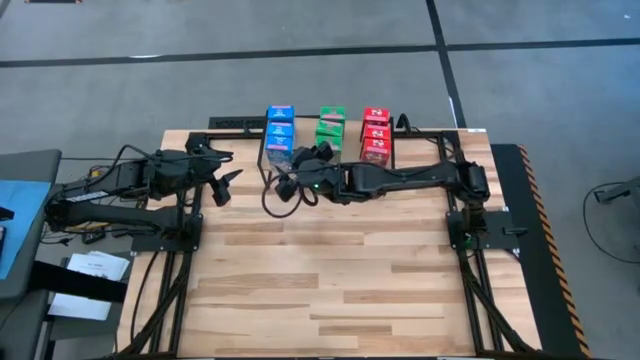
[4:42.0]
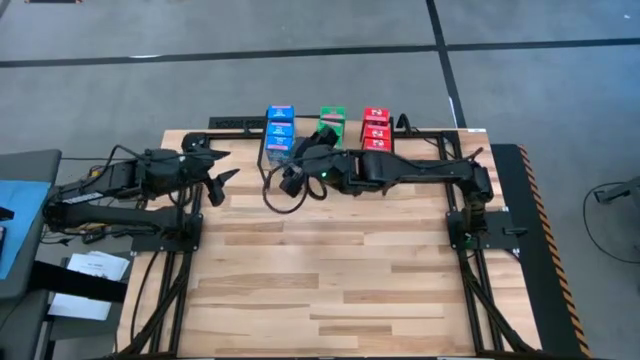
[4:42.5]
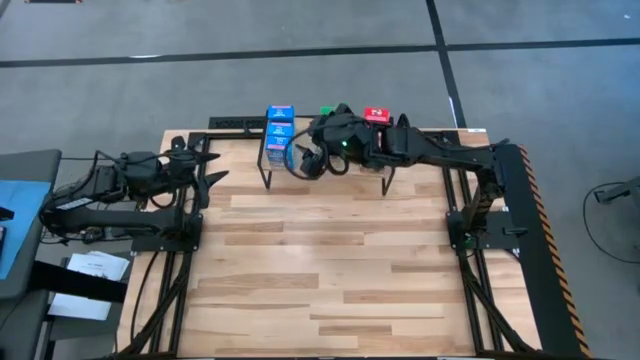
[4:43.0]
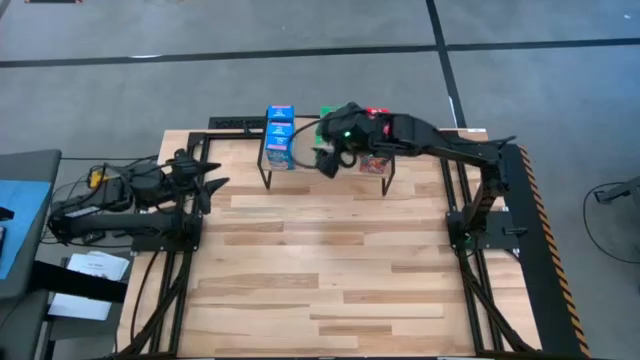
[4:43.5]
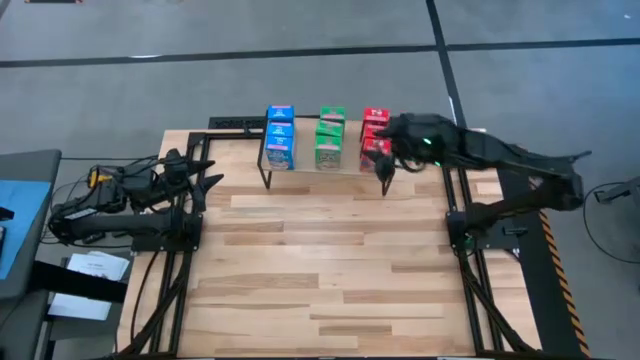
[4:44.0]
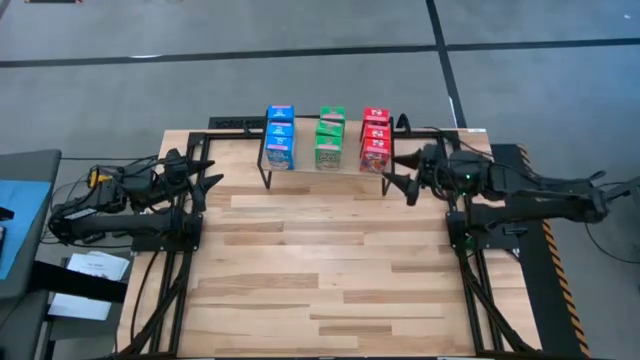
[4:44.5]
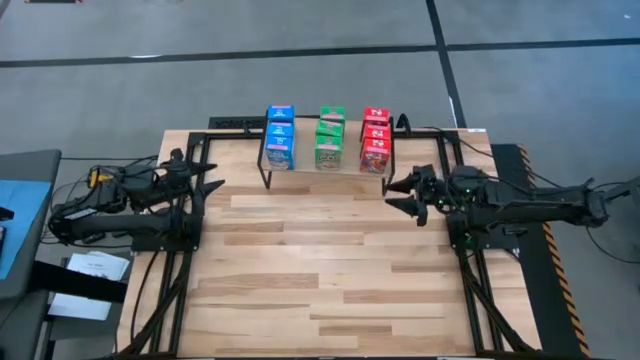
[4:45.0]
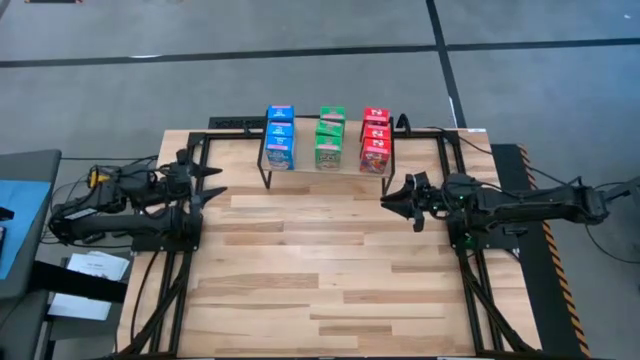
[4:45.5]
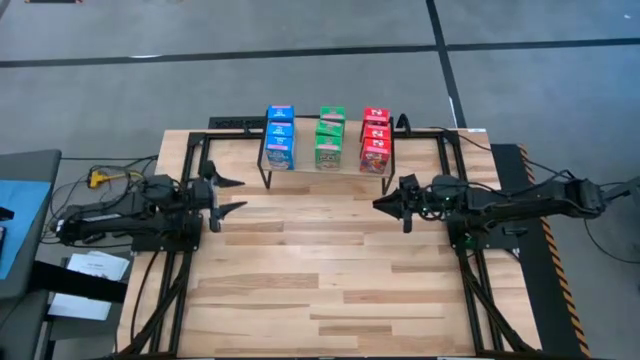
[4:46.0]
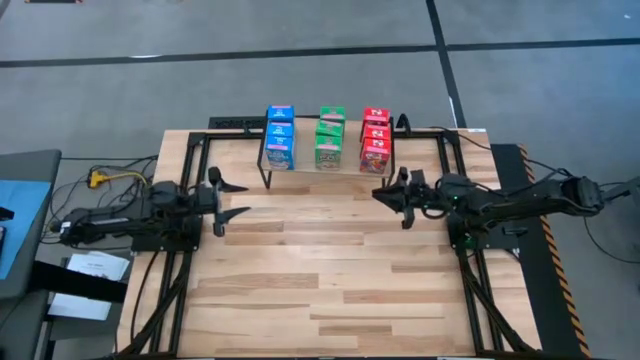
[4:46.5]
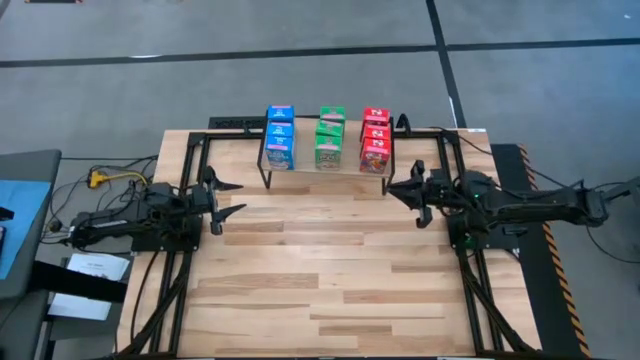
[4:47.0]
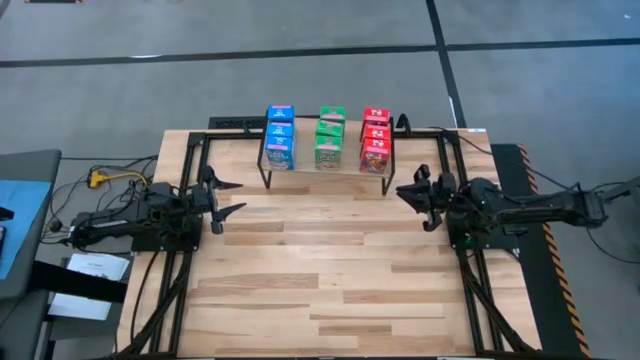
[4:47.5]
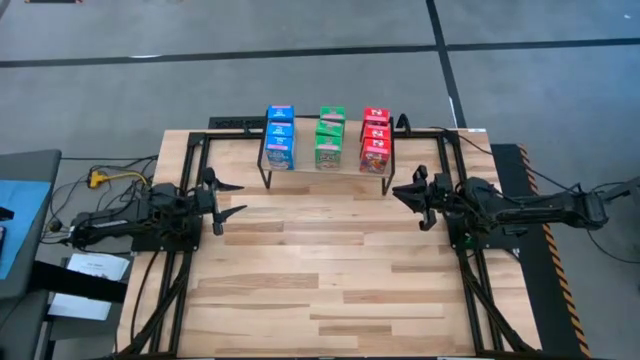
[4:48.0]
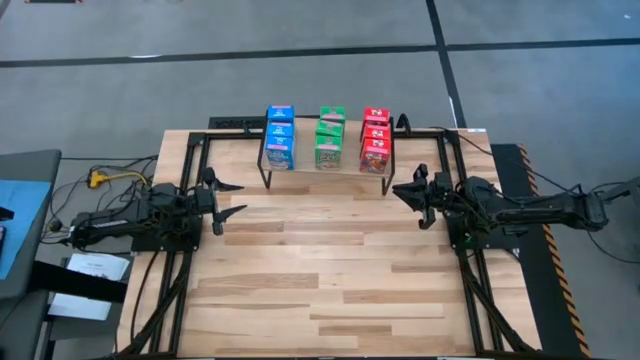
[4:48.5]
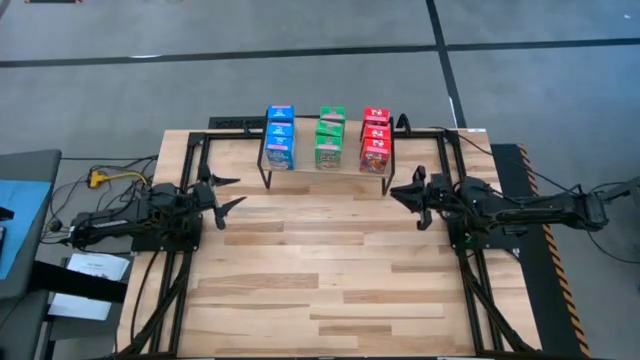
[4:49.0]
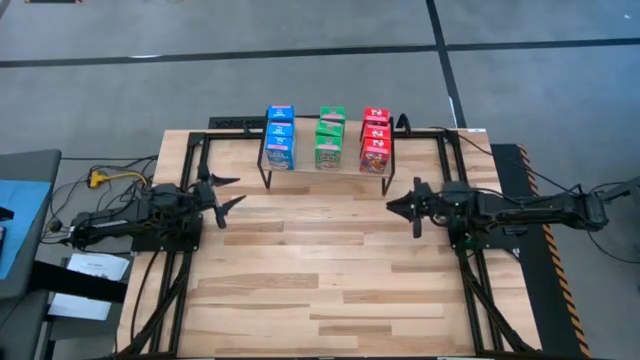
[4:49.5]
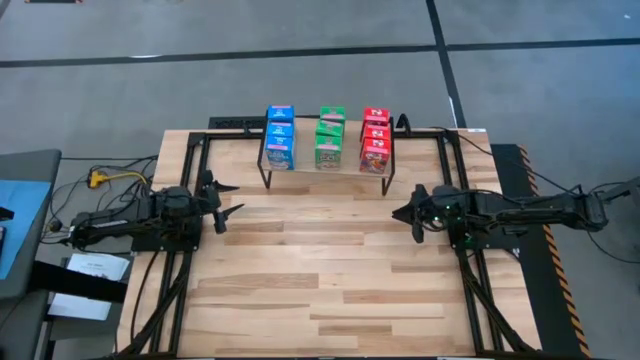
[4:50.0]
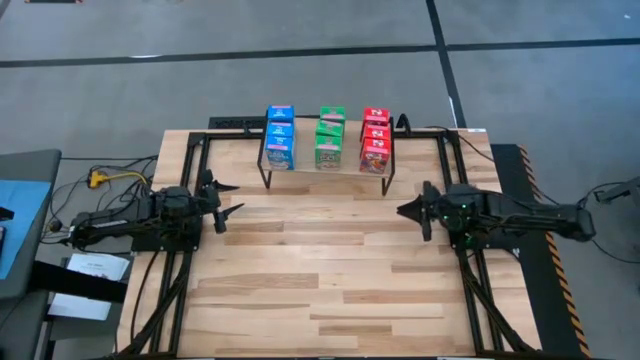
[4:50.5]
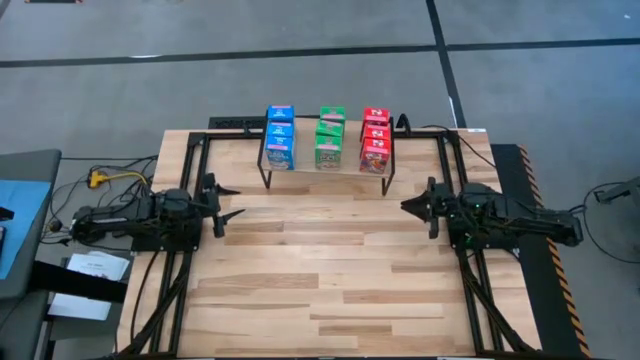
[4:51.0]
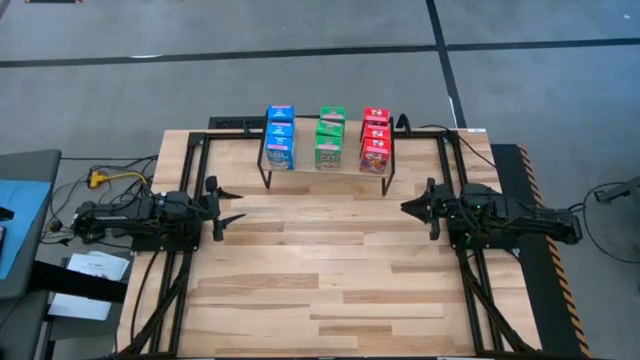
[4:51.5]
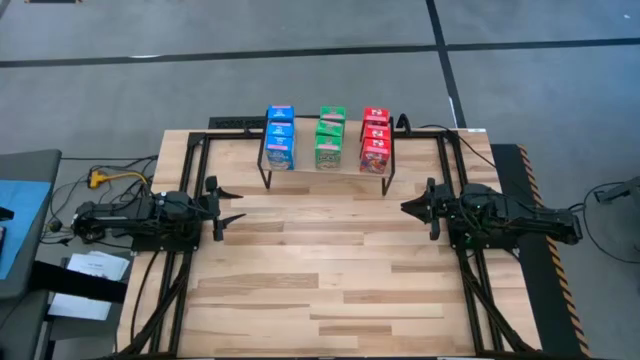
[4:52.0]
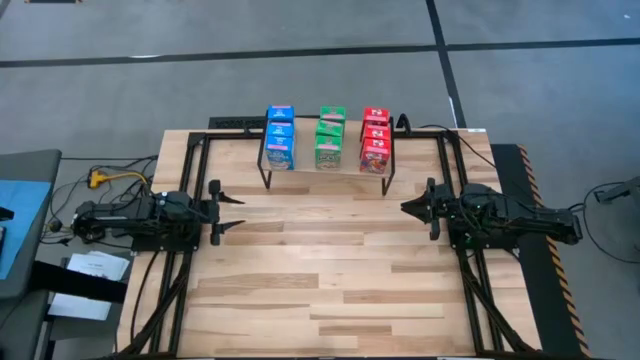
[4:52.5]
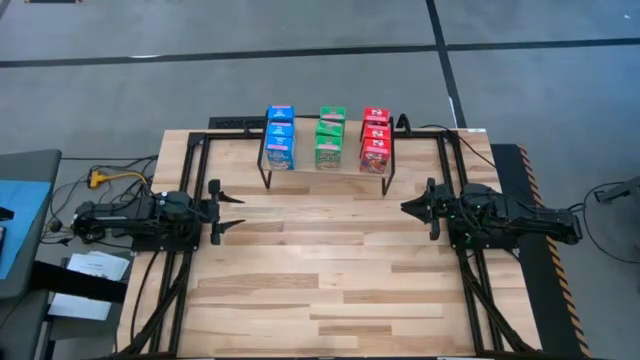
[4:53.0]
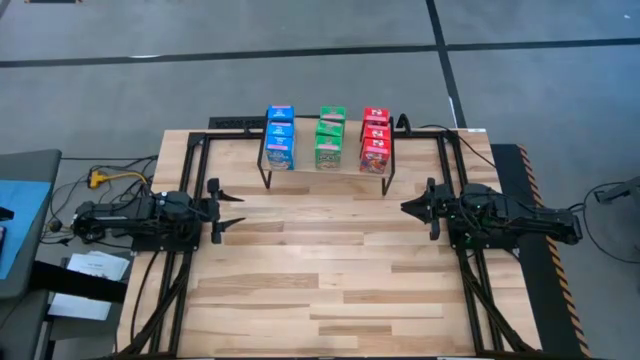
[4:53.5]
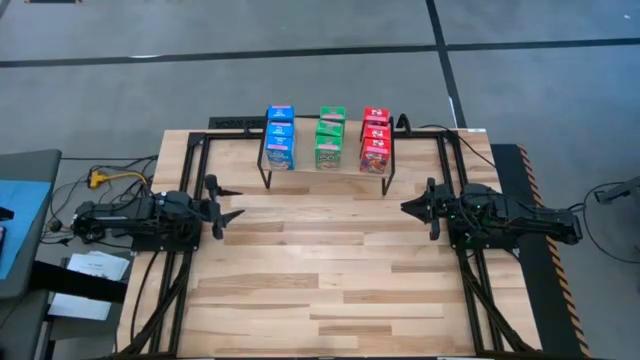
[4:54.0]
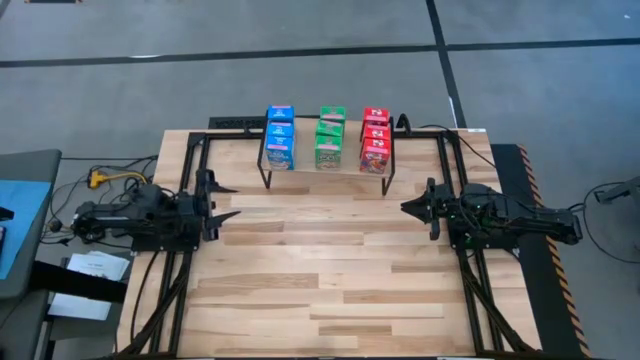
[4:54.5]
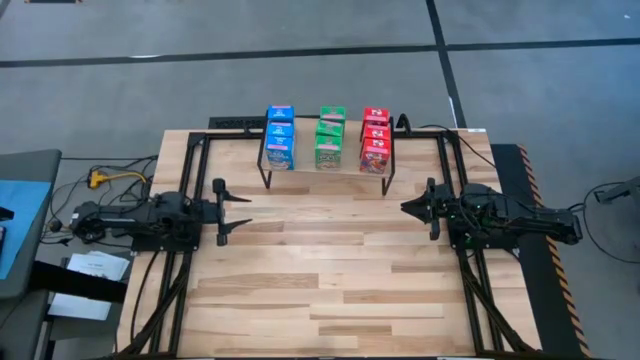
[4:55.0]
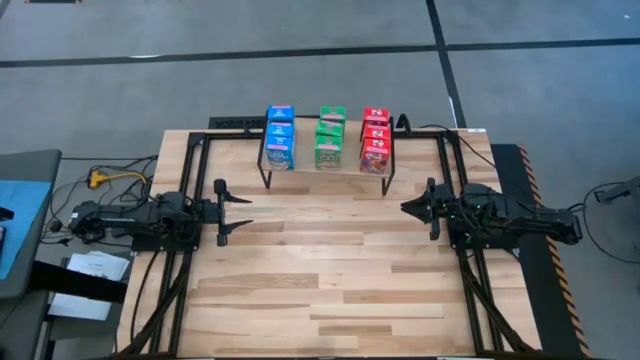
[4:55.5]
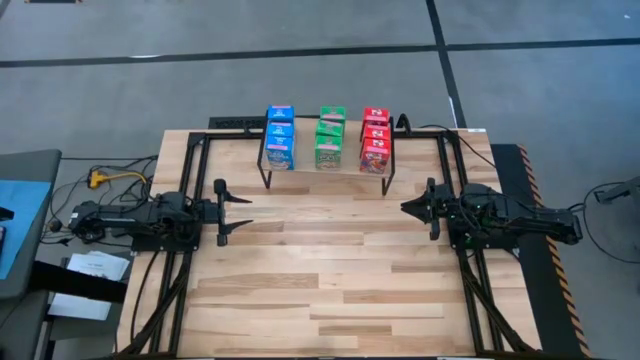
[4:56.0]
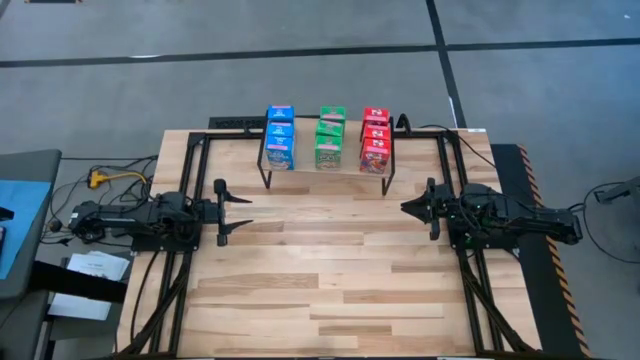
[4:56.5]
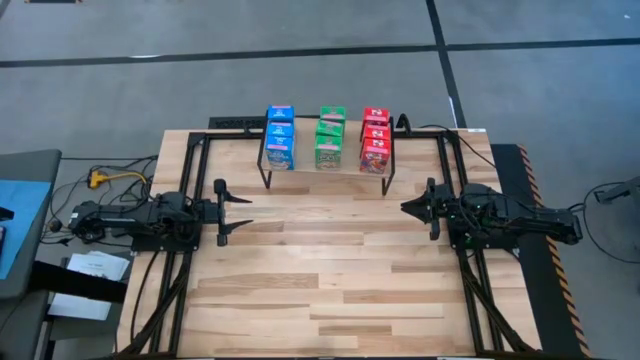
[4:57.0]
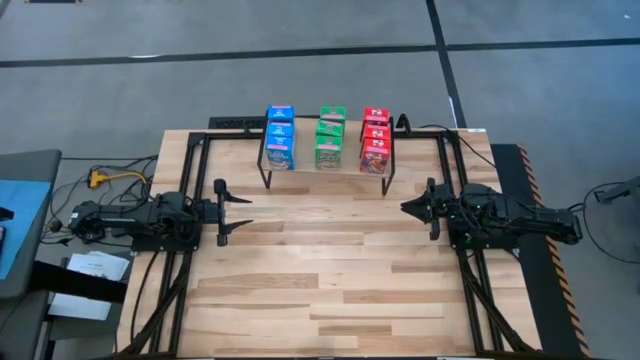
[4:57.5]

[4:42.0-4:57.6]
Task: Stack cereal on shelf
Return to Home Position

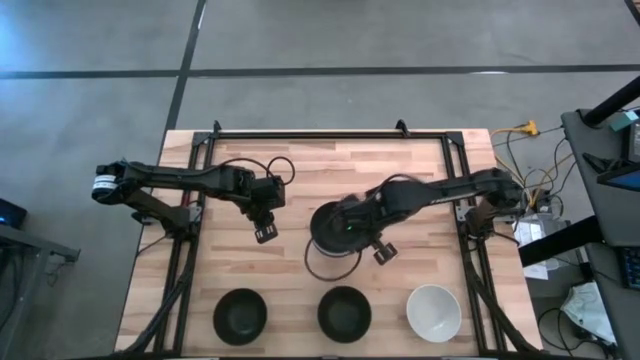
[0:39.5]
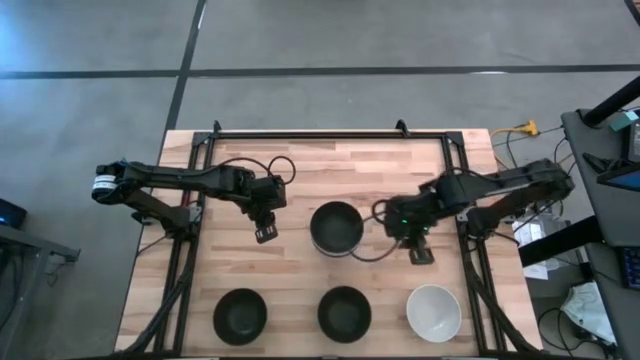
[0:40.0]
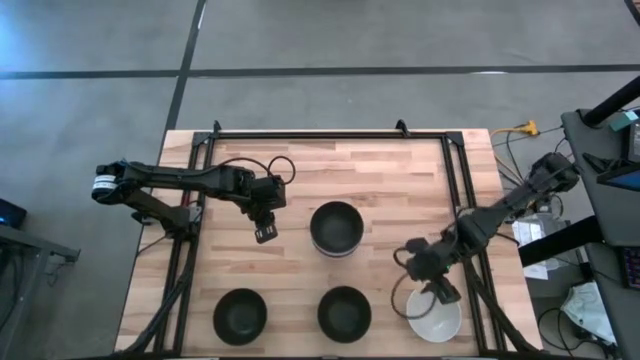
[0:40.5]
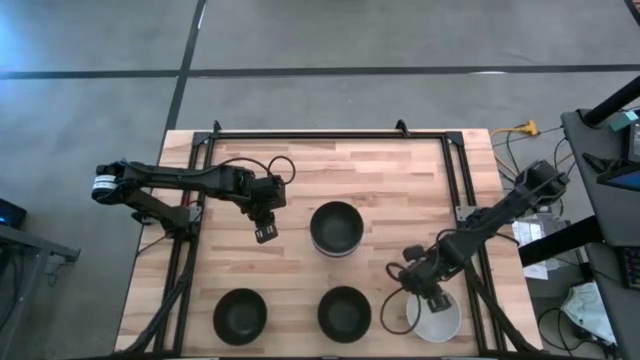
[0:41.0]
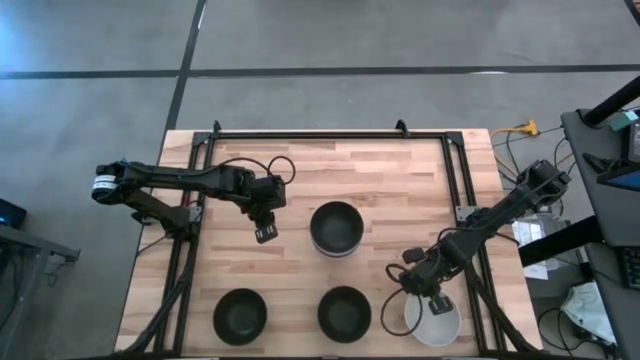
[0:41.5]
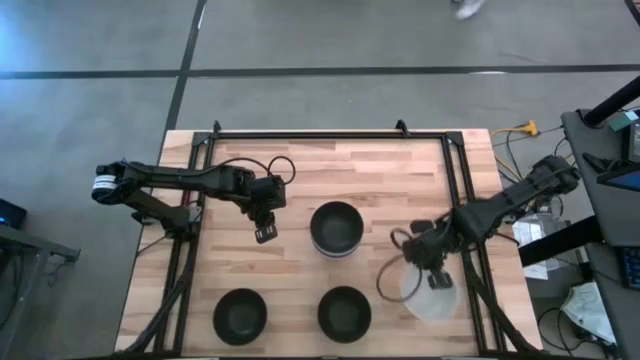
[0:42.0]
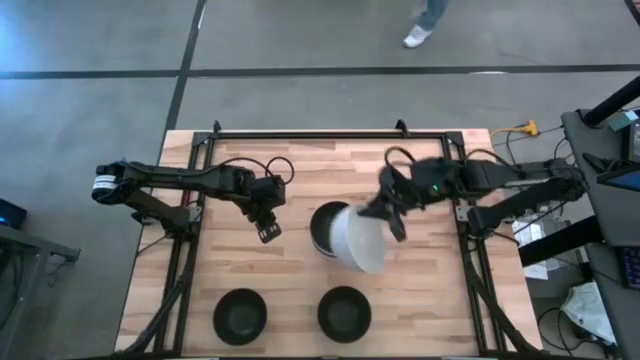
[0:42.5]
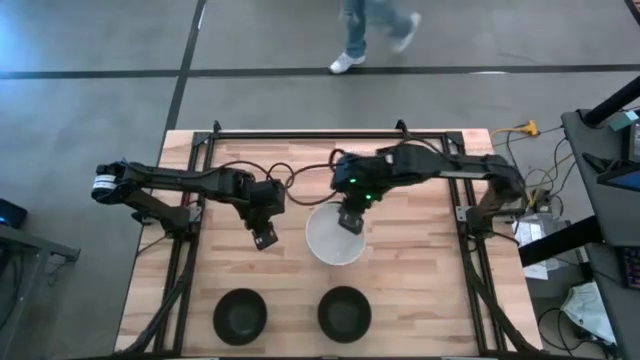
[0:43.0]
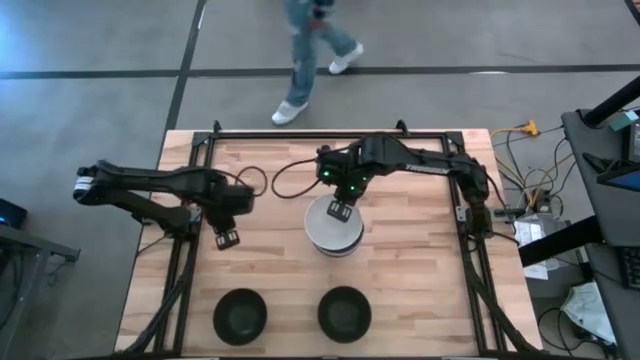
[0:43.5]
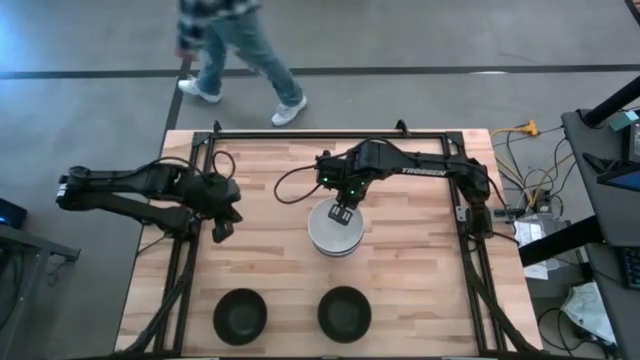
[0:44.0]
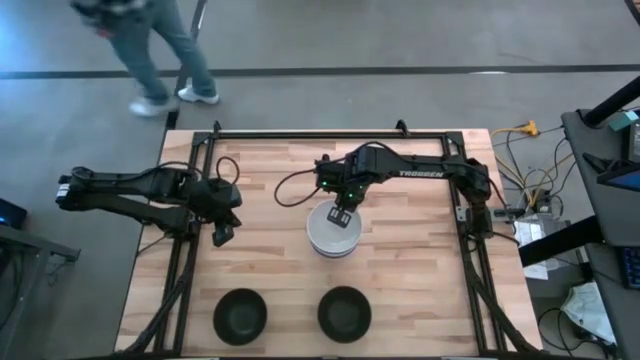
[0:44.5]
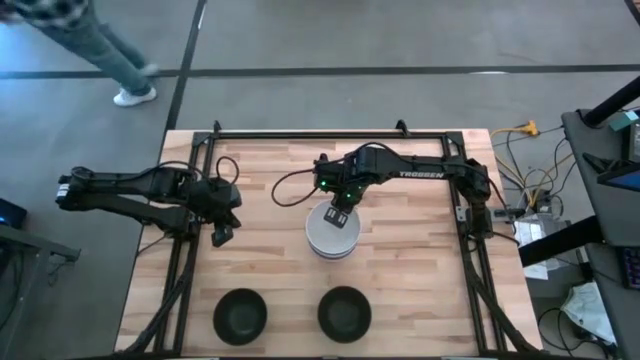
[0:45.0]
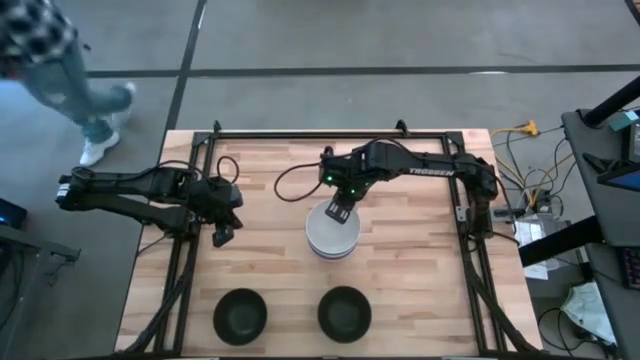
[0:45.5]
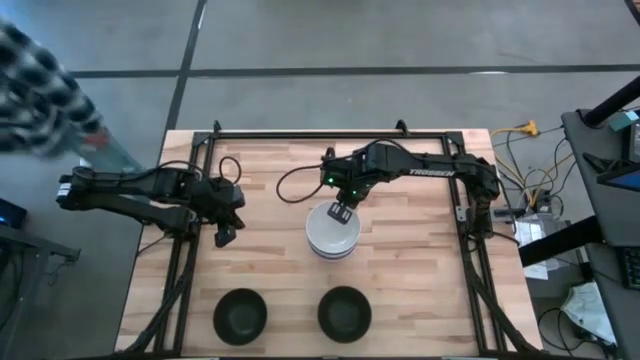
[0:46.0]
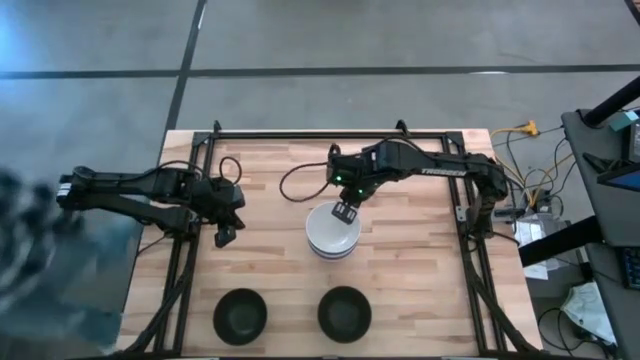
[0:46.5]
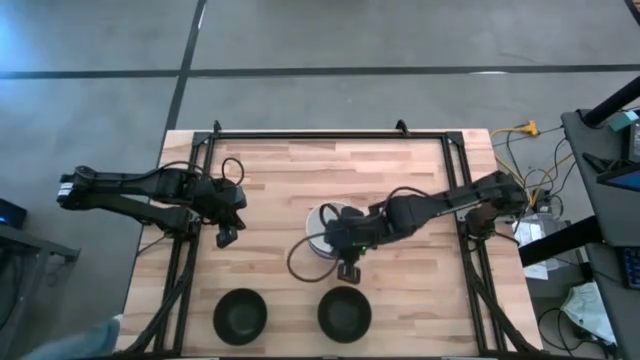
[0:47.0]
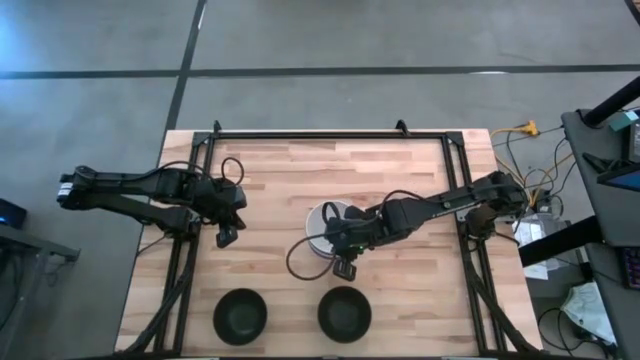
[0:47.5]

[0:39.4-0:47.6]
Task: Nest bowls inside each other
Stack the white bowl on the black bowl
